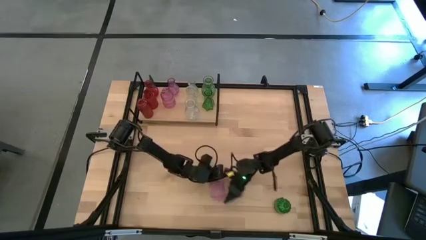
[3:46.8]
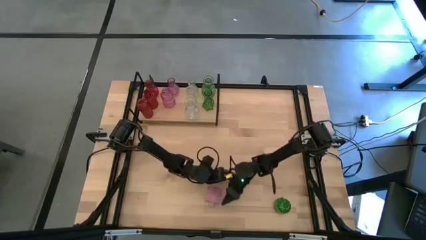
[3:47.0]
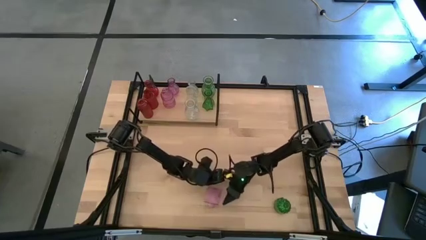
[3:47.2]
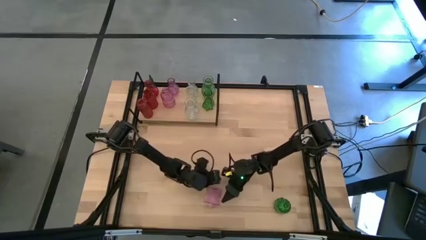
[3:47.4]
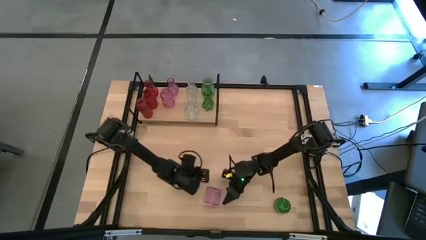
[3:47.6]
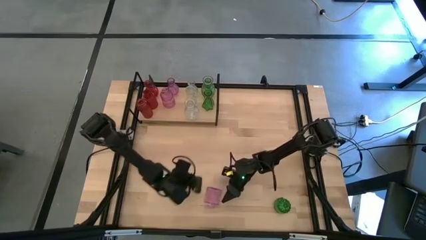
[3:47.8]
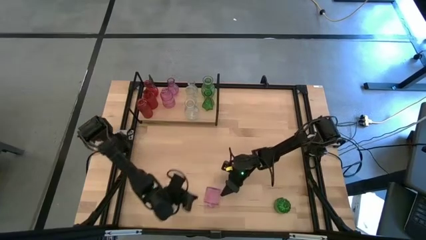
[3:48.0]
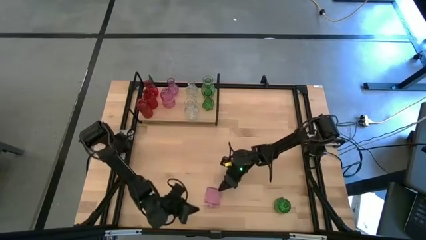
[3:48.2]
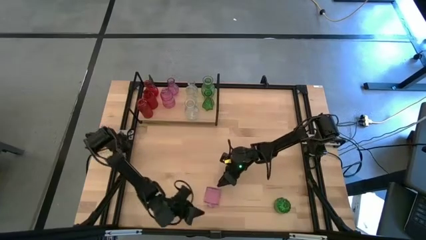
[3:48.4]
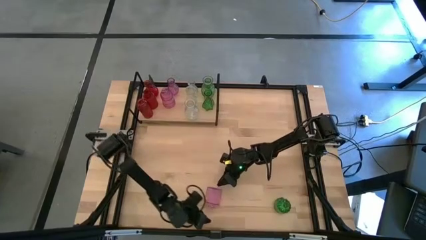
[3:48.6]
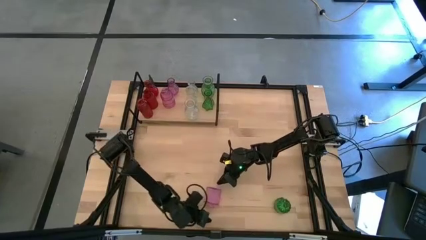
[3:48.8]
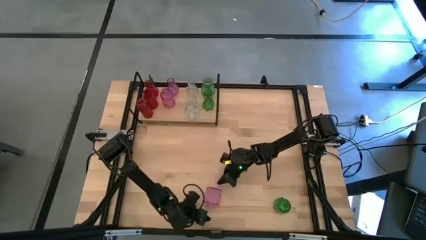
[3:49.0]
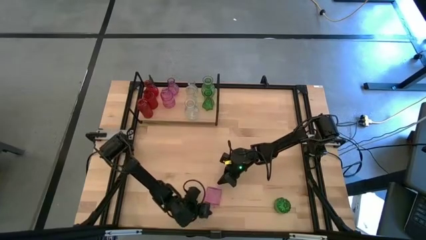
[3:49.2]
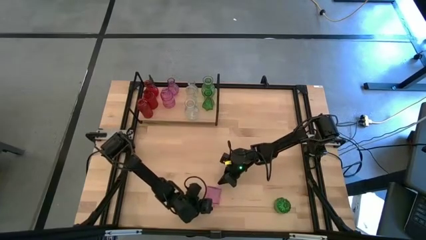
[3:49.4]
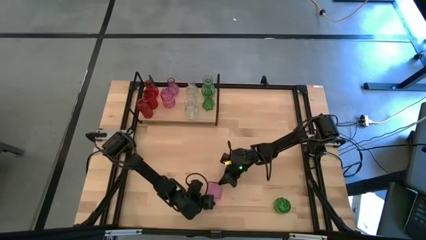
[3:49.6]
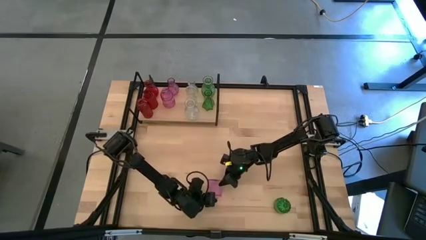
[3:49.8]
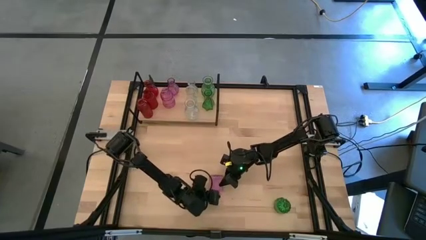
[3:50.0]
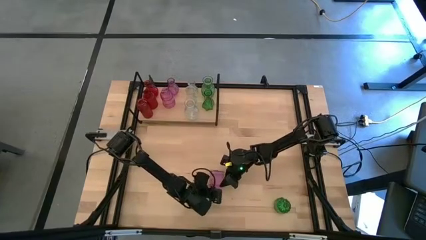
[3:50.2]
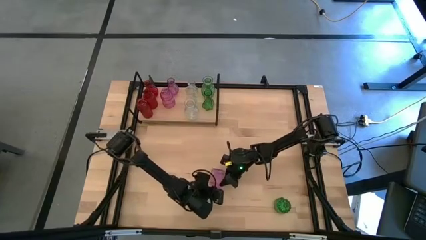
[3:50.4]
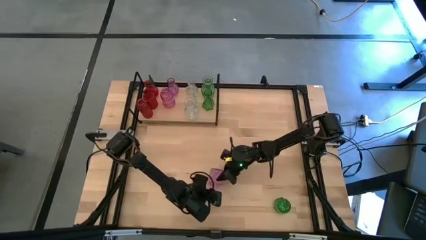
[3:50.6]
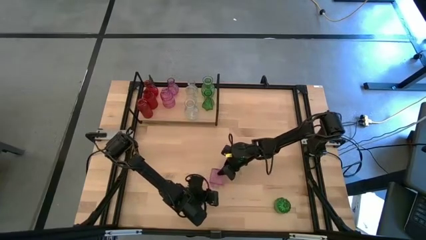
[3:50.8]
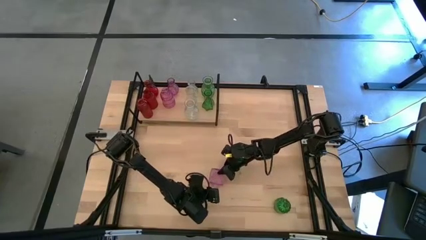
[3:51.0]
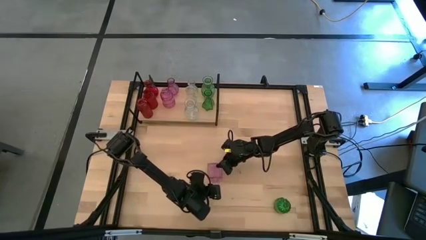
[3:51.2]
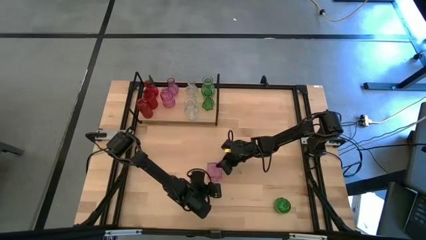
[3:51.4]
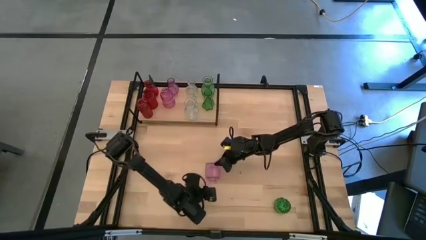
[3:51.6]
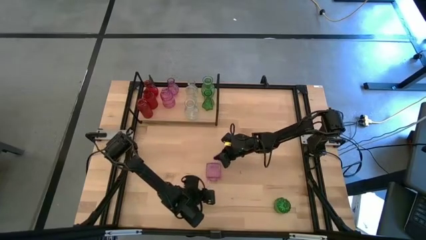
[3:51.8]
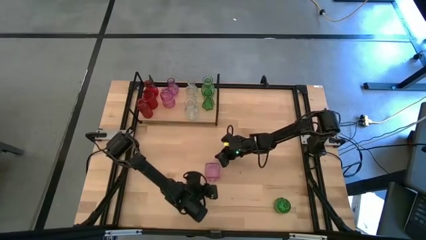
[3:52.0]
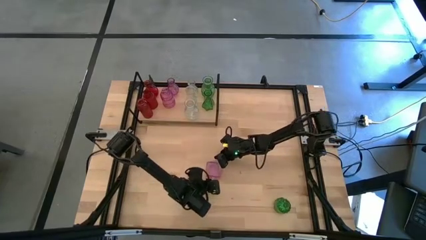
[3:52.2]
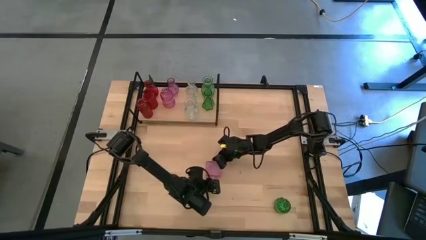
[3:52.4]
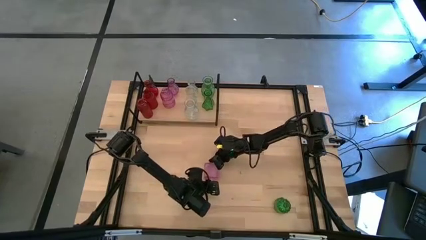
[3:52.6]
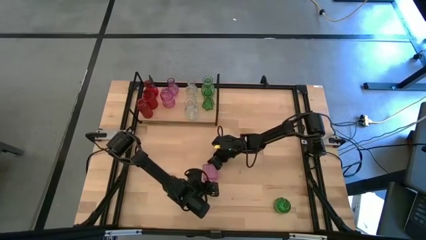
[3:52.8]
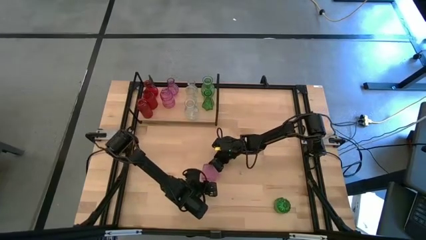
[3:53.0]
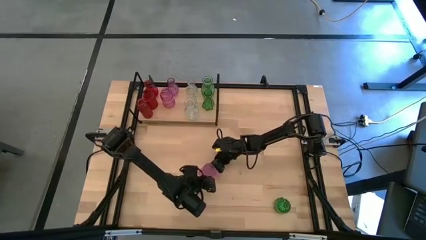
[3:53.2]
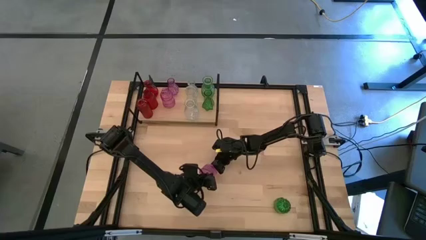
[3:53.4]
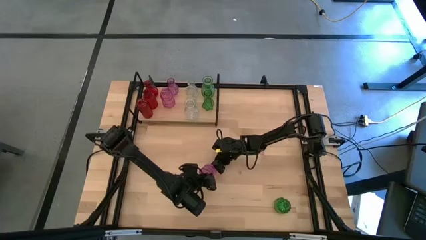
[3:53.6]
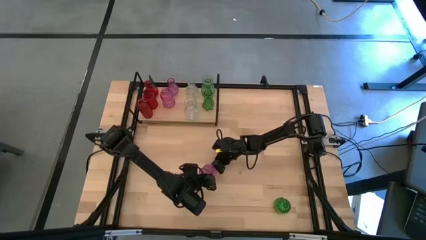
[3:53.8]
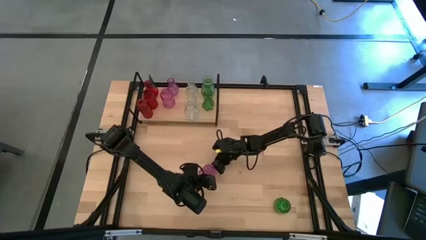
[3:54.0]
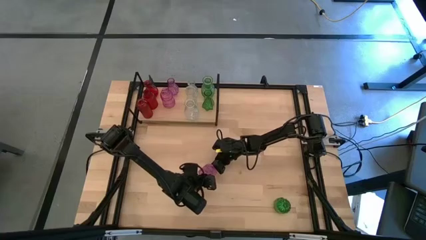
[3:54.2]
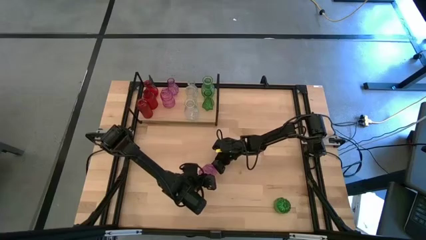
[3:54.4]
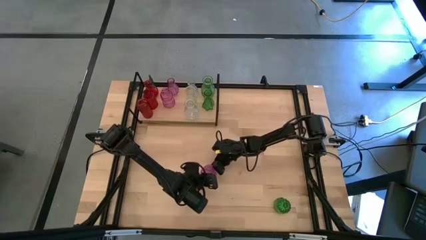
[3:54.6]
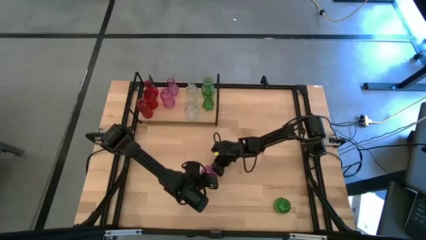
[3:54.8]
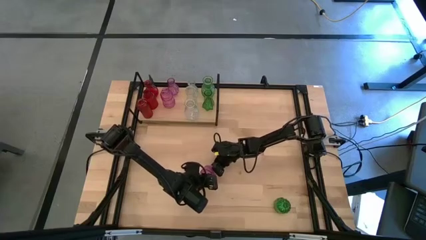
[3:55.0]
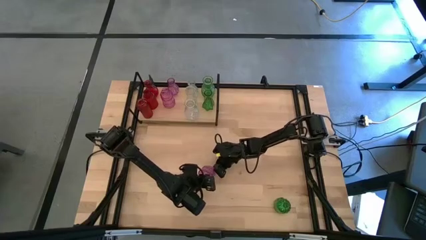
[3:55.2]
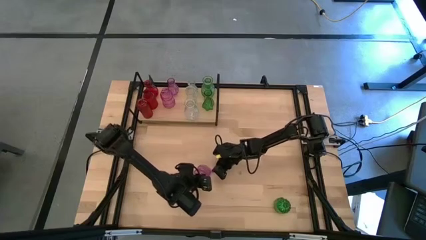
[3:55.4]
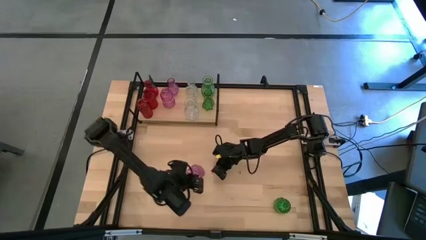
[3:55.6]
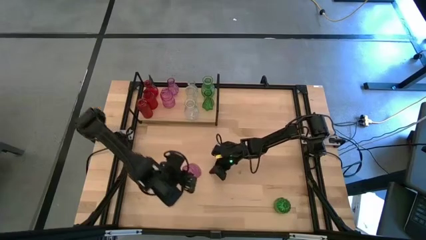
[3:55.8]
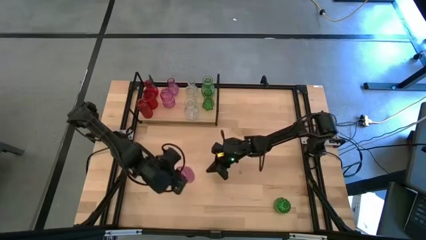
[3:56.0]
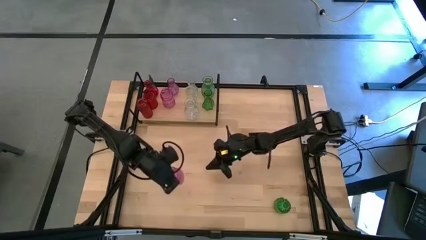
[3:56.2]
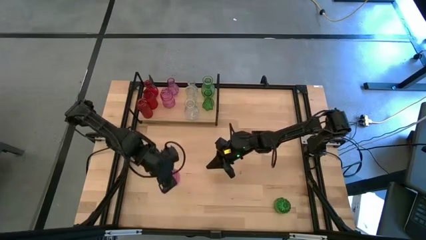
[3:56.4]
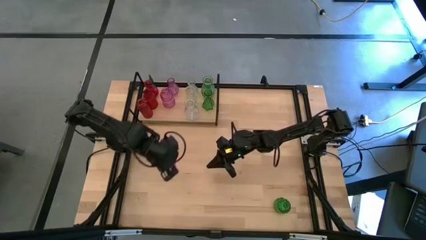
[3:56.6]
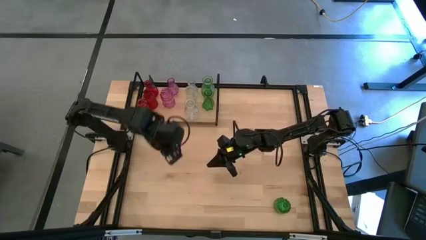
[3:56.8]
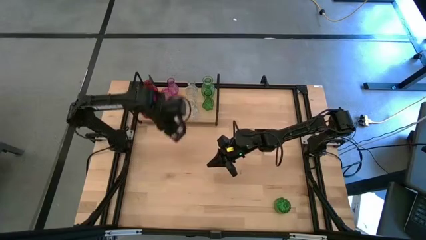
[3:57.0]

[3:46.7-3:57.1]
Task: sort vases onto shelf
Put the purple vase on the shelf aligned with the other purple vases

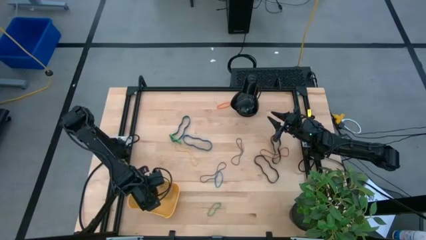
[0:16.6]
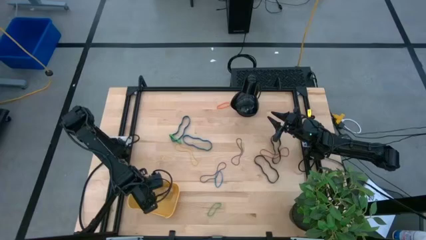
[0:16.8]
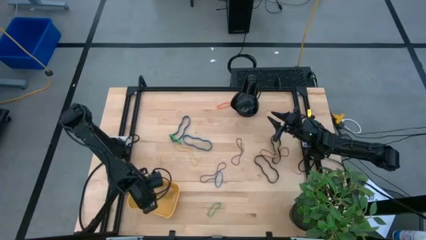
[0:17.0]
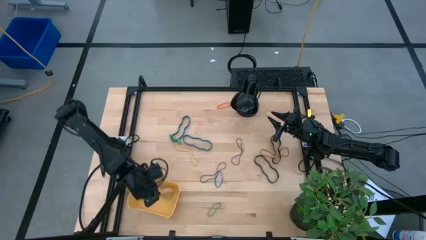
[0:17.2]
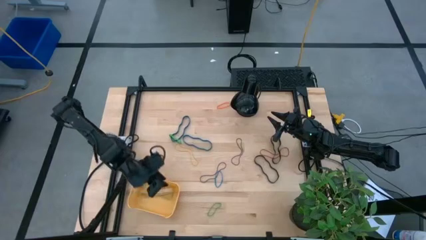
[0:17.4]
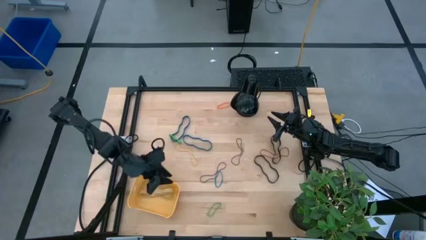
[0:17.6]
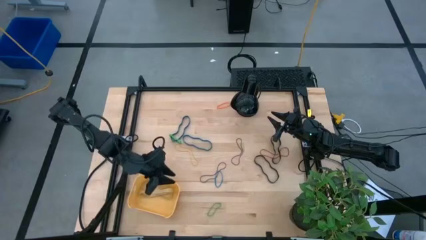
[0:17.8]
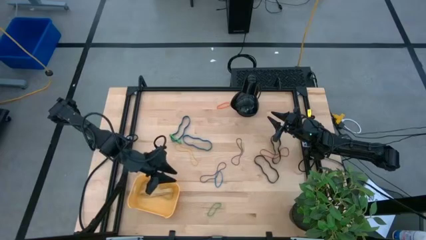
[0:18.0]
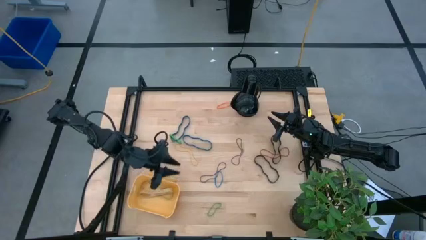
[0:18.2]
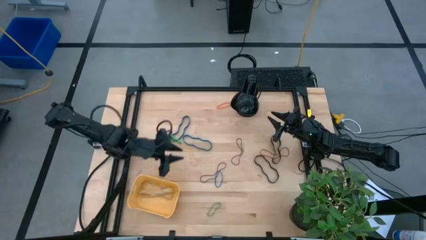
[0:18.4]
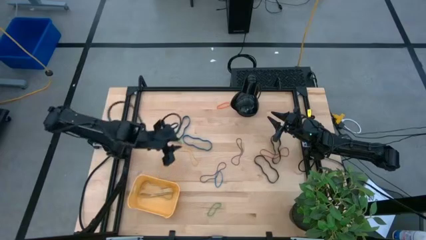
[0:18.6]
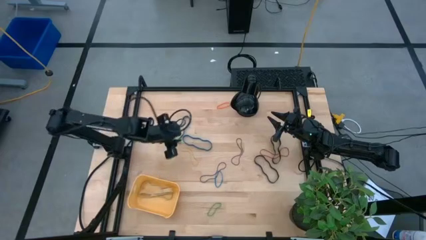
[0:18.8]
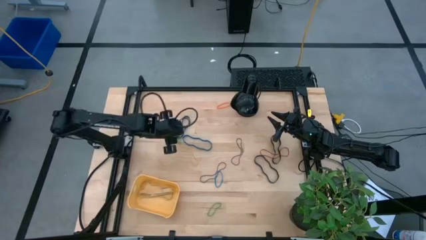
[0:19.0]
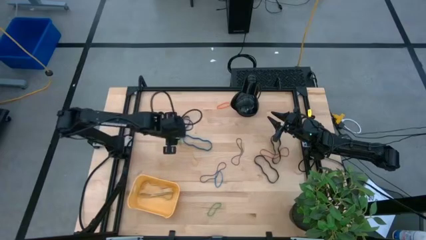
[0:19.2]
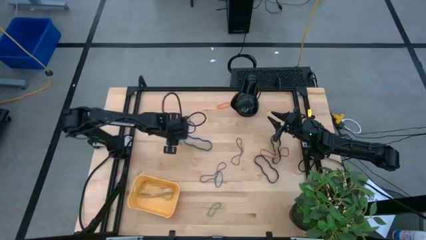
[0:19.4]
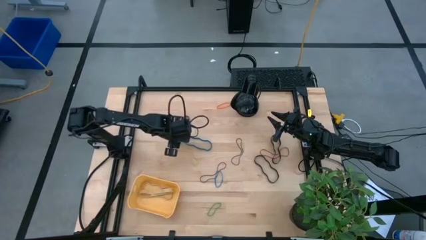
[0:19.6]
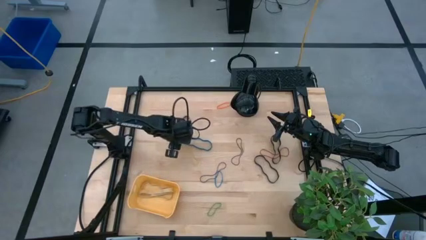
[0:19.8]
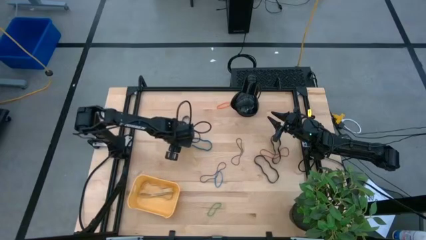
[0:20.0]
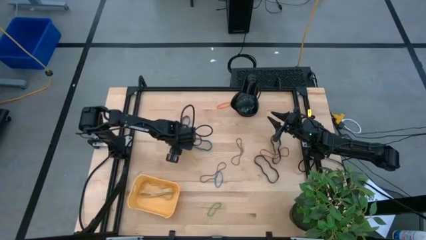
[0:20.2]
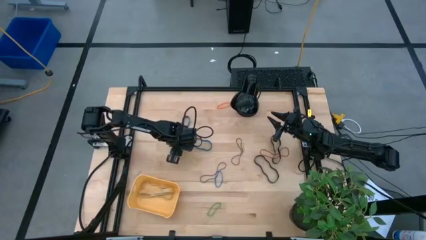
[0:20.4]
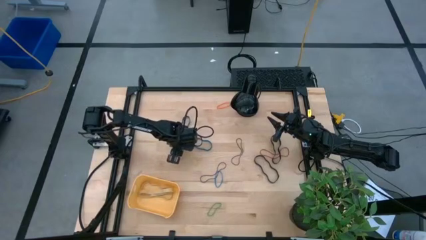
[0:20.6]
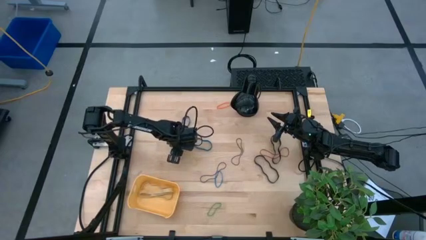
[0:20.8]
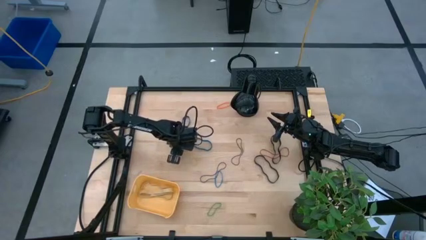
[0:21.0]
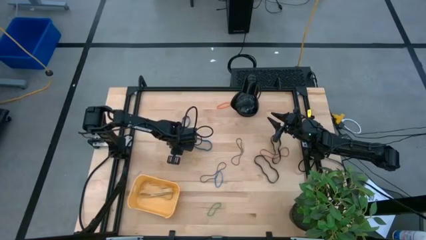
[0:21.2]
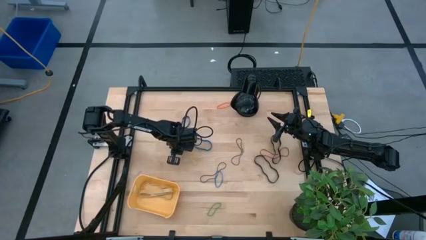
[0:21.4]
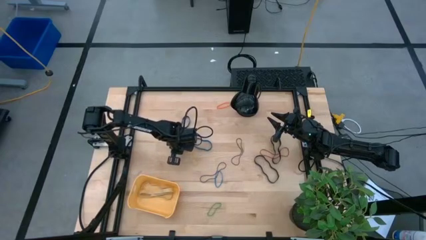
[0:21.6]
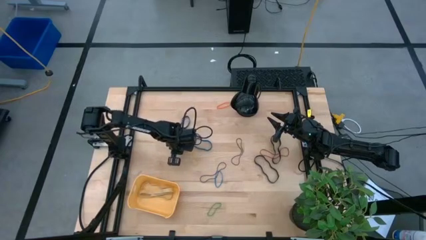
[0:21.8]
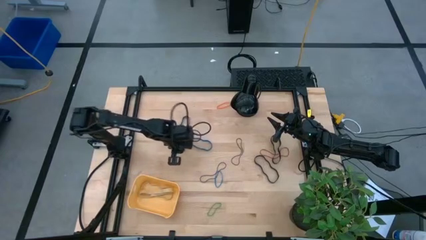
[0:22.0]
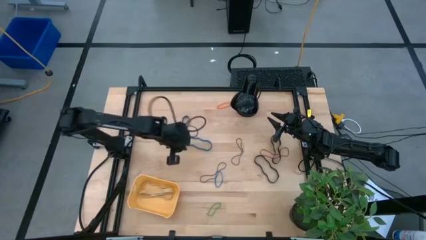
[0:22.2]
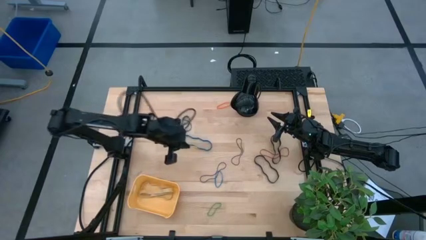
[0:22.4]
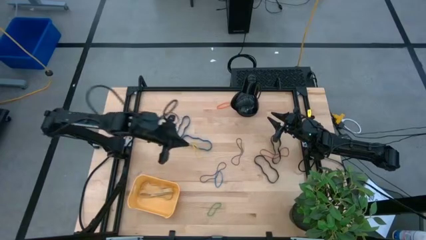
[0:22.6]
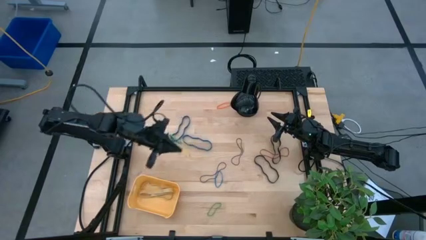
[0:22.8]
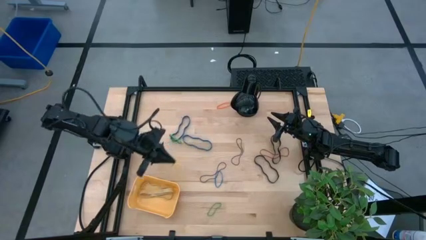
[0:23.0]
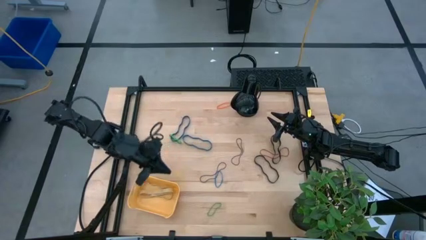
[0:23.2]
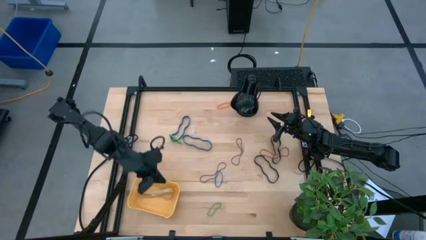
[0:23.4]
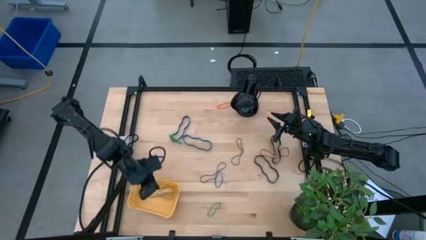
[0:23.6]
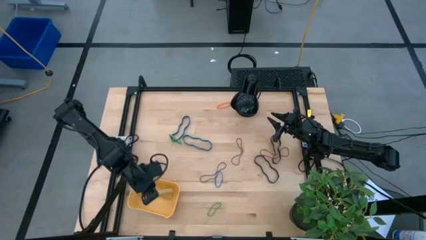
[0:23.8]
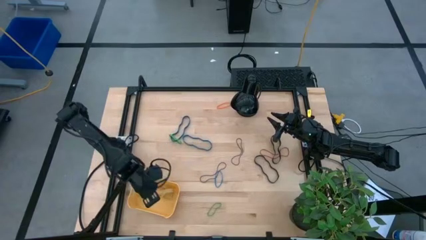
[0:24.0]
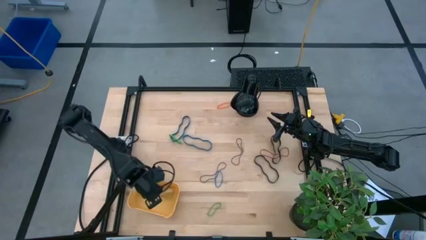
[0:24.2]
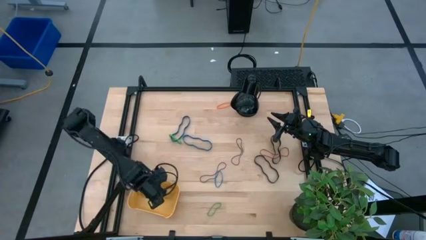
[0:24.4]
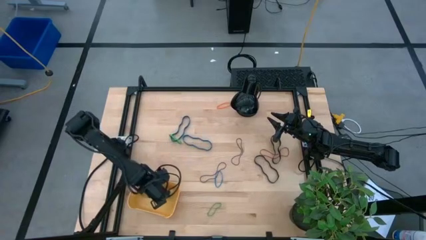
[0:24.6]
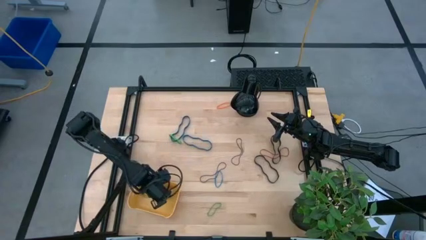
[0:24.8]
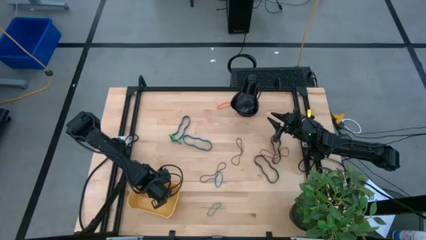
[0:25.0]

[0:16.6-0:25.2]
Task: Pick and place rubber bands into bin
Put the yellow rubberband into the yellow bin
